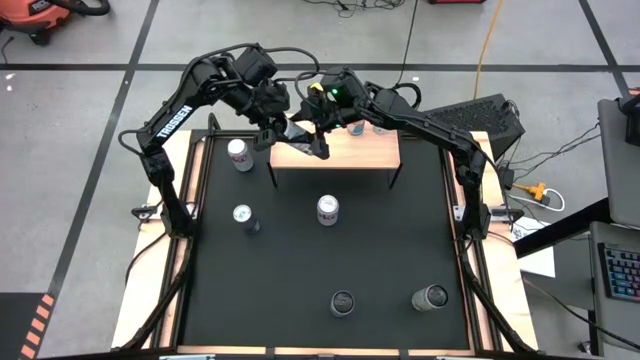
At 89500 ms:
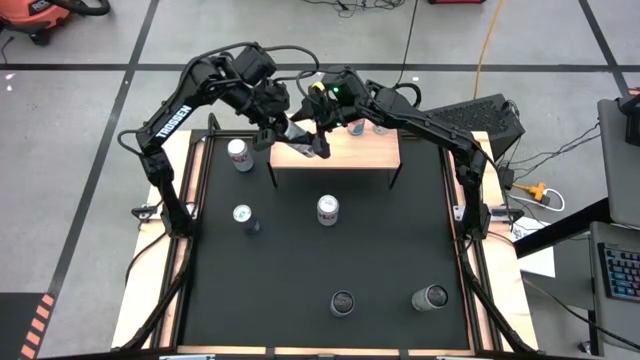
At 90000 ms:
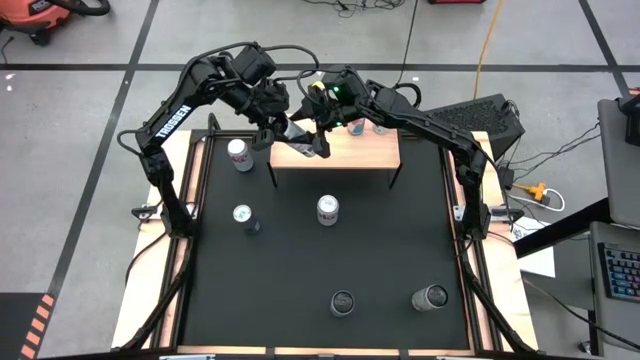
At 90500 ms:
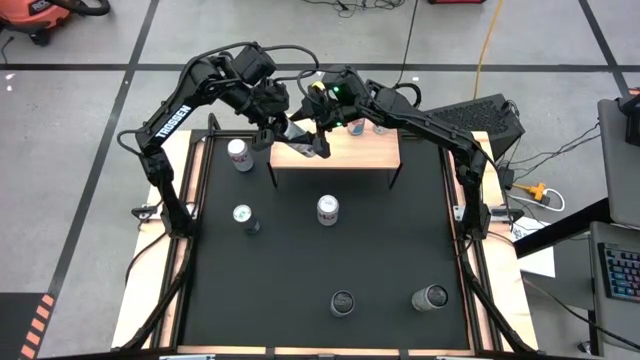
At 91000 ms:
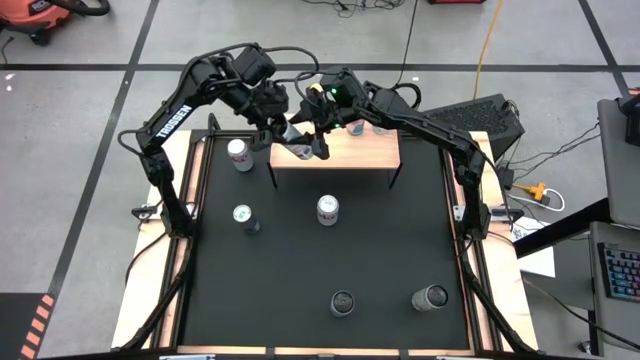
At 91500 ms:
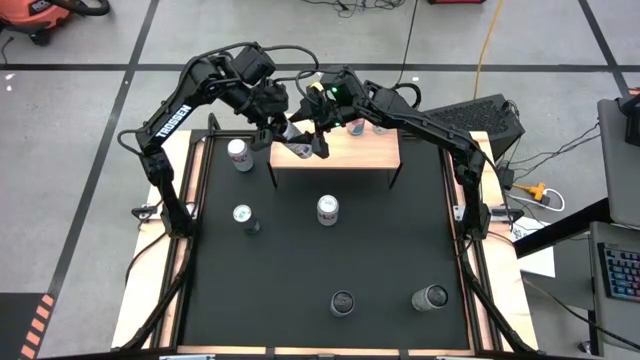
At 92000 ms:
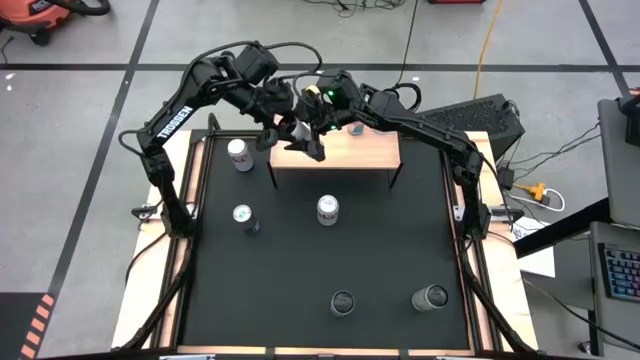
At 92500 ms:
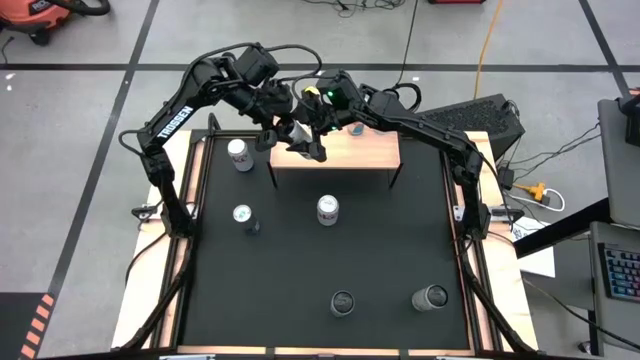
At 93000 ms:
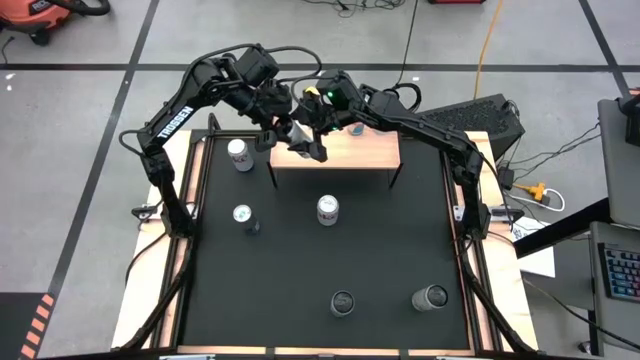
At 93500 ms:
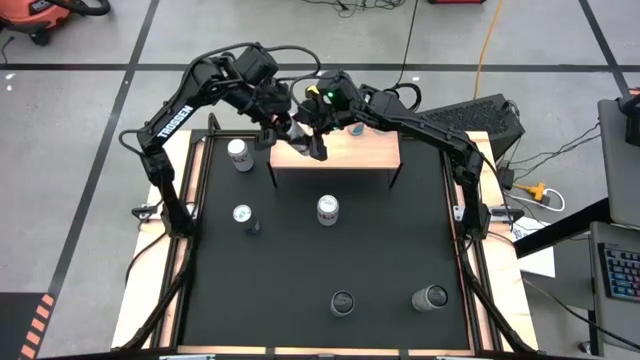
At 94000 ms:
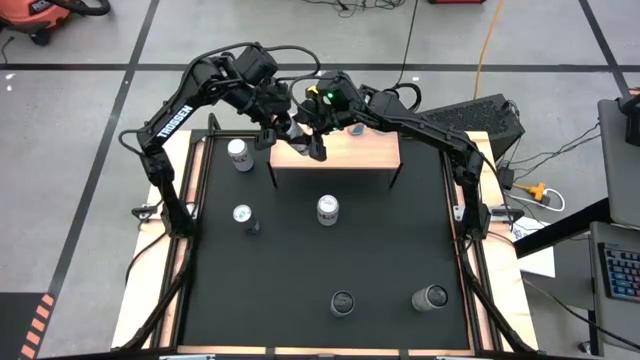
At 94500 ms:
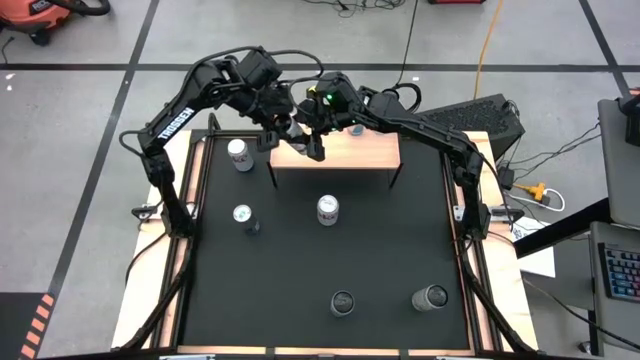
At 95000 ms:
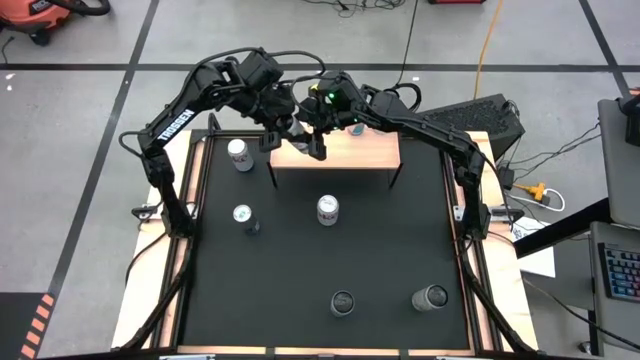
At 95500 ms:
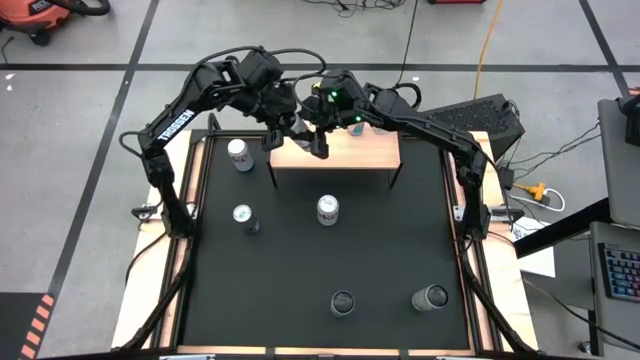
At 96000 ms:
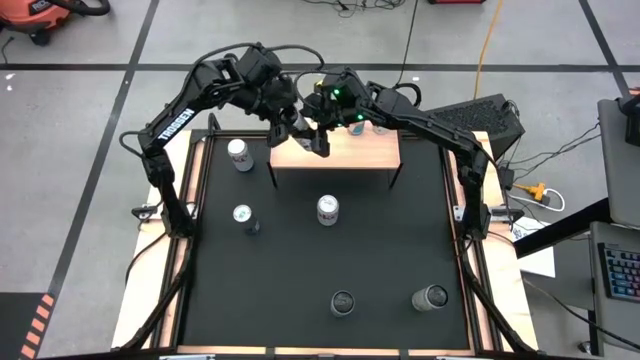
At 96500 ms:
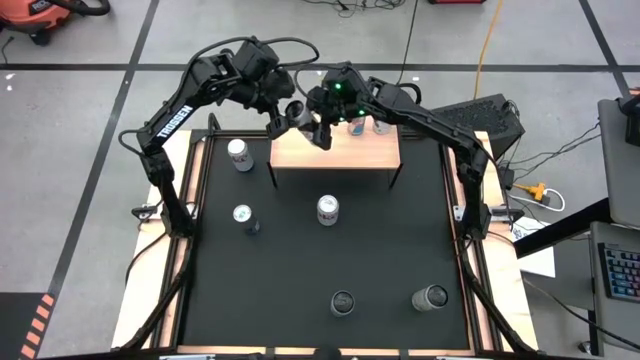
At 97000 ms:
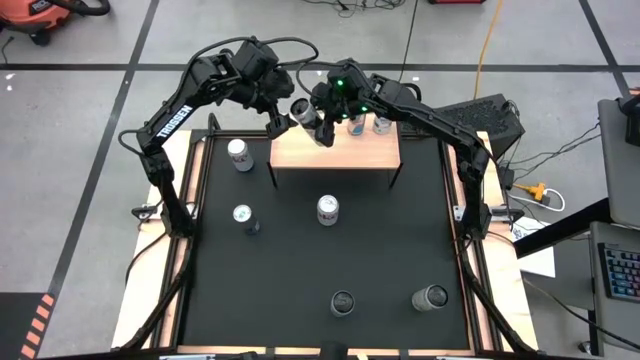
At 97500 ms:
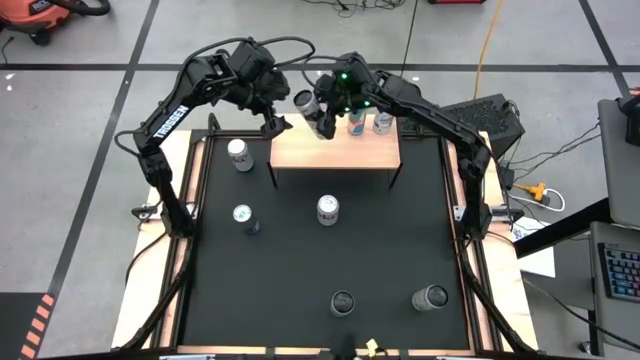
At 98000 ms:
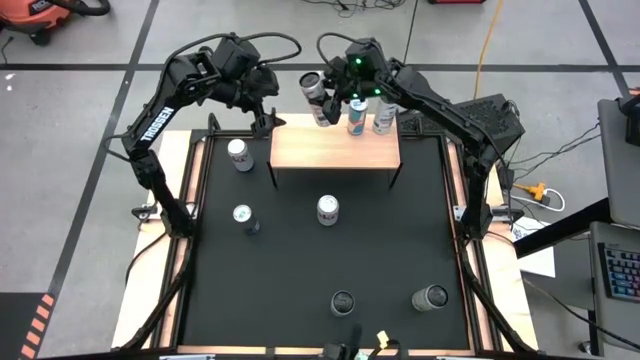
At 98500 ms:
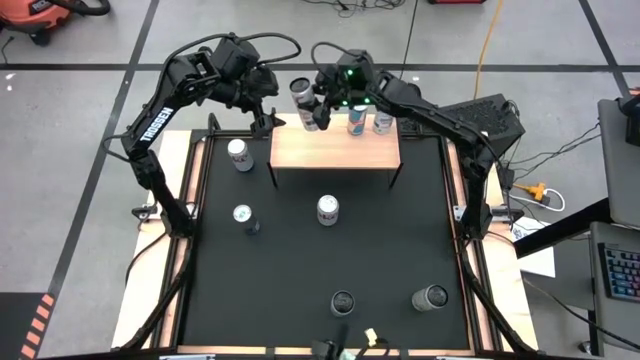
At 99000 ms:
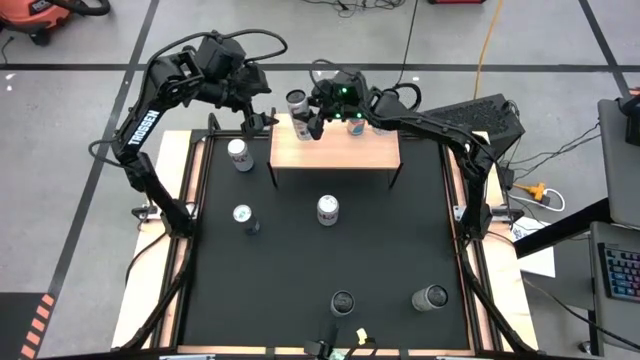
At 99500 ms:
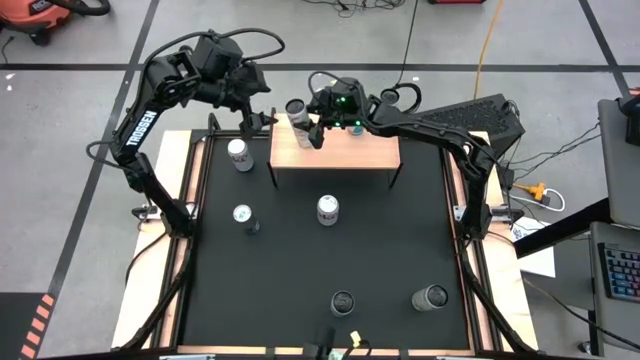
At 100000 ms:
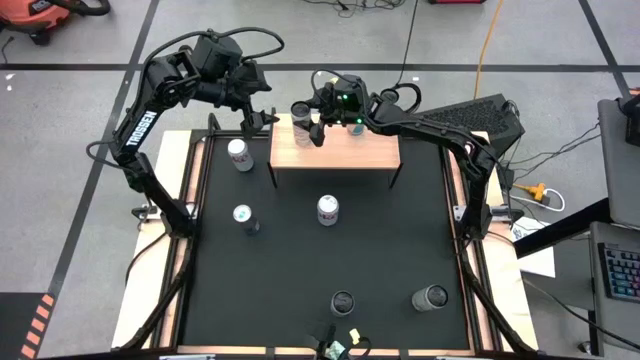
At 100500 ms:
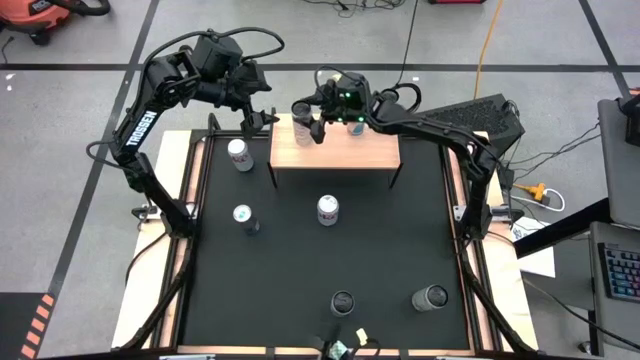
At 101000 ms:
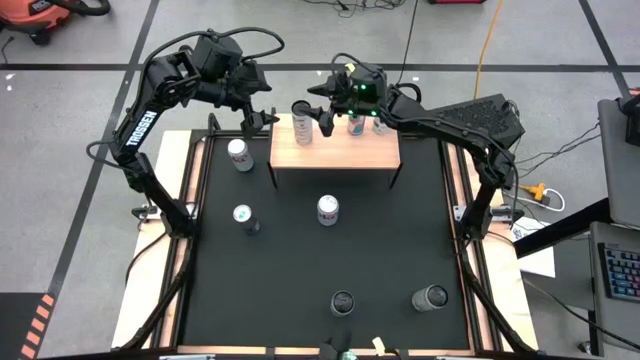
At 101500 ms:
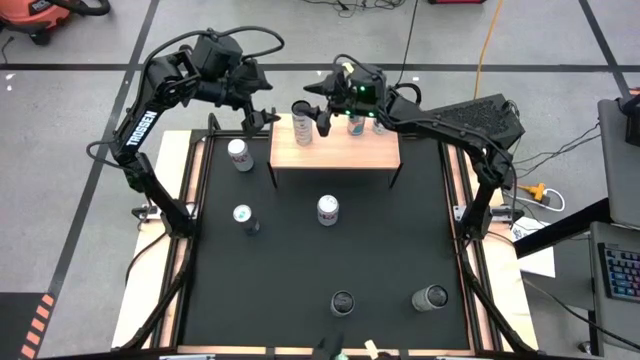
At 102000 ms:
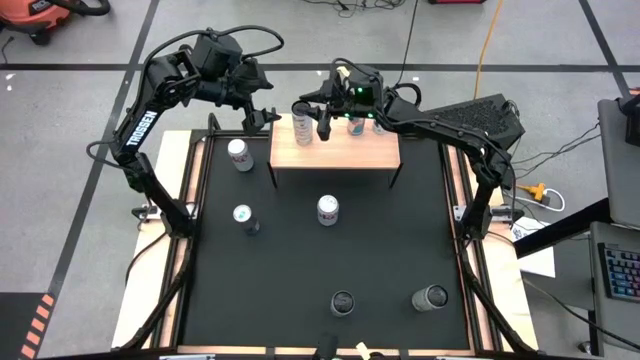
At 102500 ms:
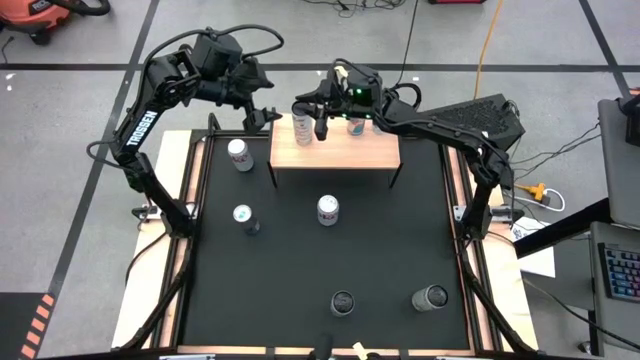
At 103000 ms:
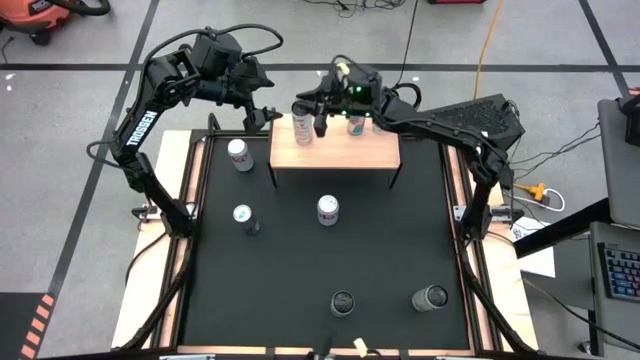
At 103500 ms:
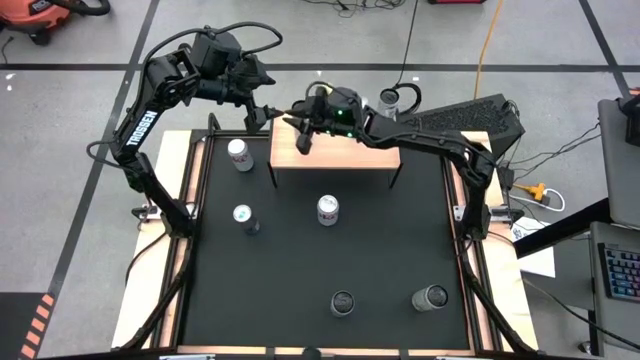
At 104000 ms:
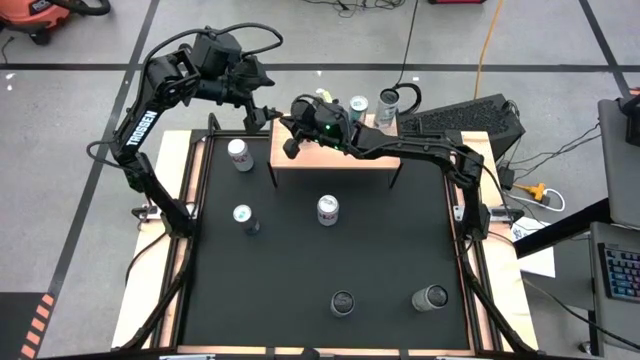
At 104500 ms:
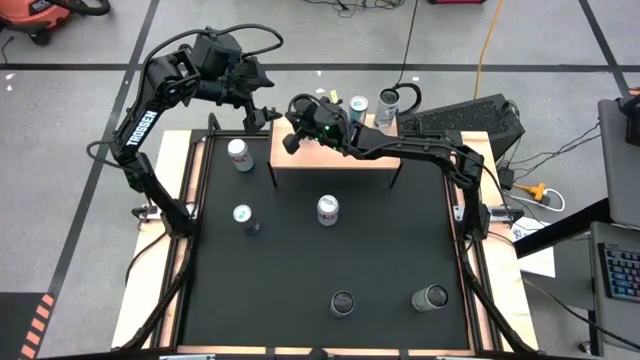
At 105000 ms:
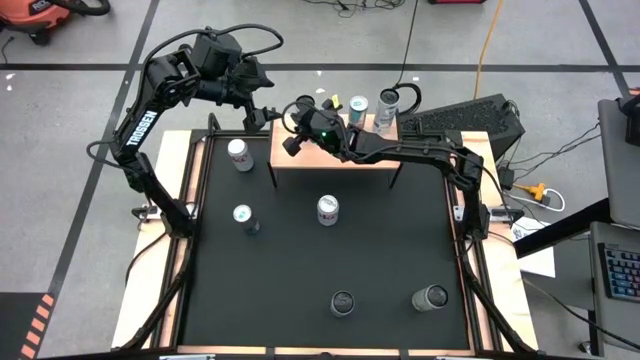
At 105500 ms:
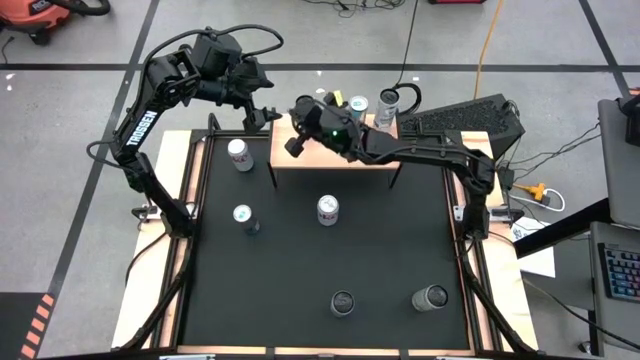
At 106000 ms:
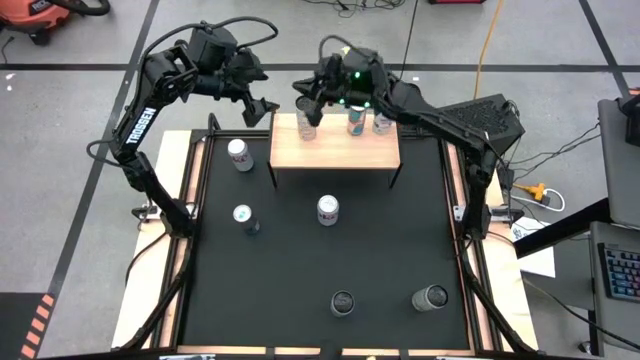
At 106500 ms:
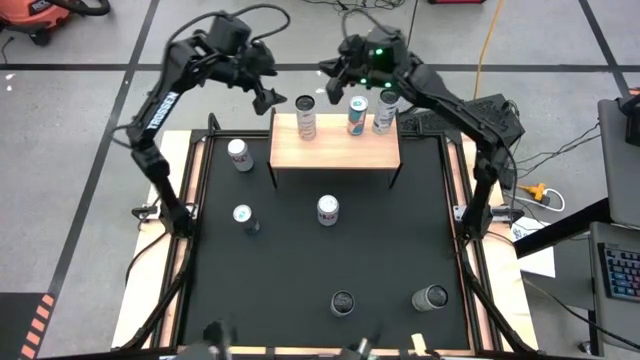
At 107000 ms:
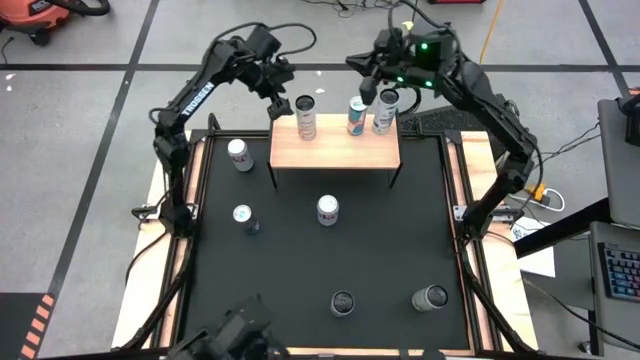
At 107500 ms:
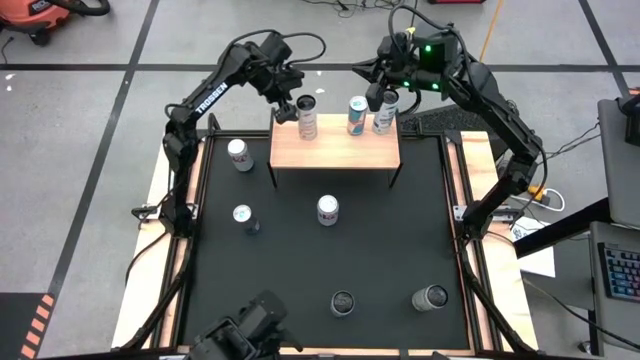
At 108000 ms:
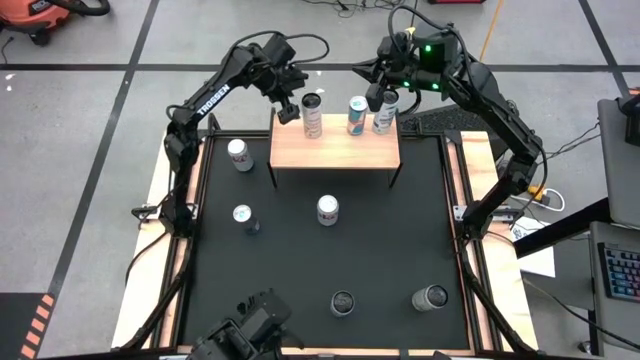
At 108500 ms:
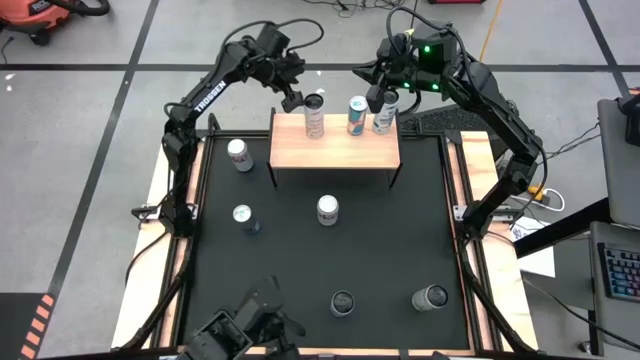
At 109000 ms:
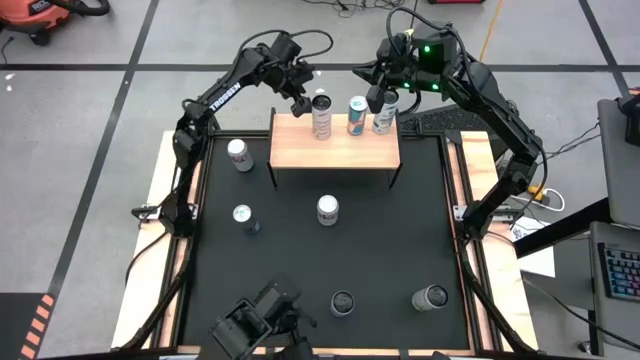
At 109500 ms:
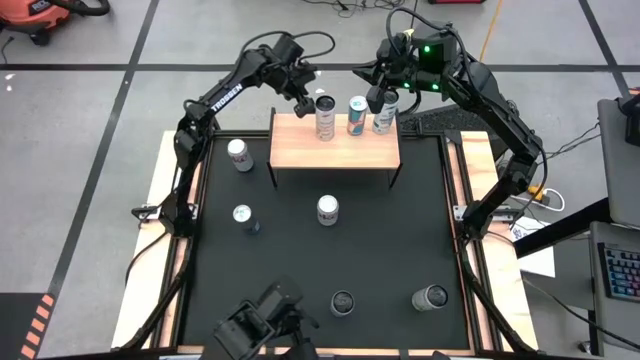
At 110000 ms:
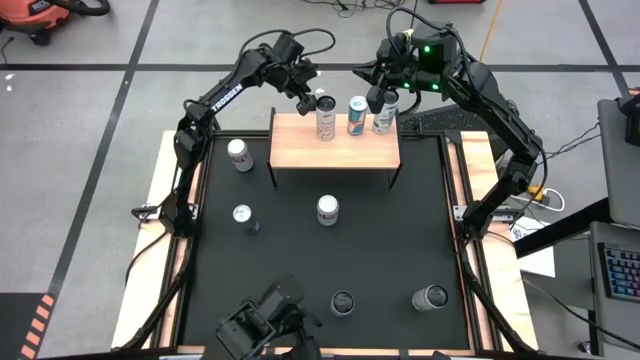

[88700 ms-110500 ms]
Task: Place canned beverage on shelf
Put the left white-yellow soda can on the shelf
